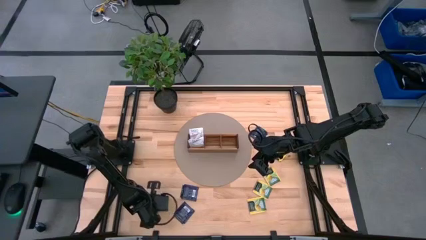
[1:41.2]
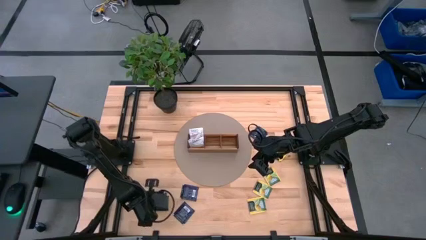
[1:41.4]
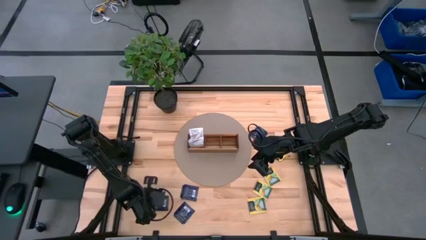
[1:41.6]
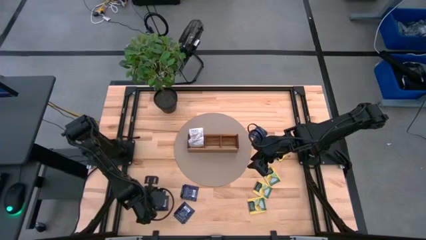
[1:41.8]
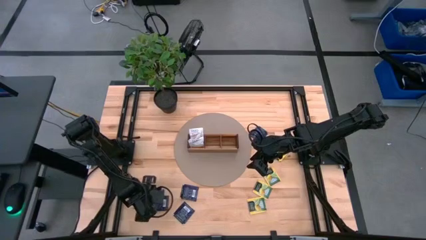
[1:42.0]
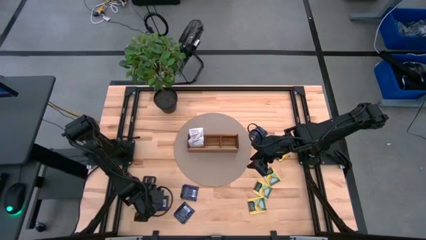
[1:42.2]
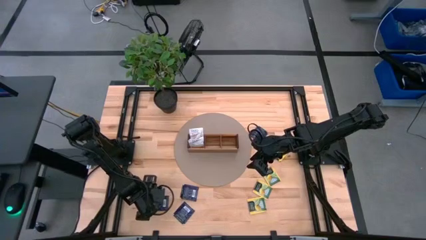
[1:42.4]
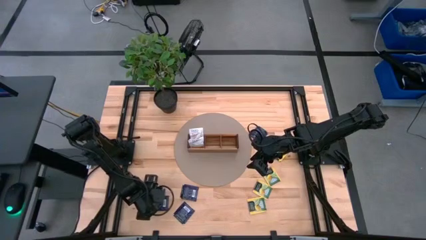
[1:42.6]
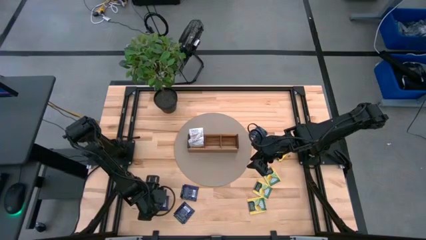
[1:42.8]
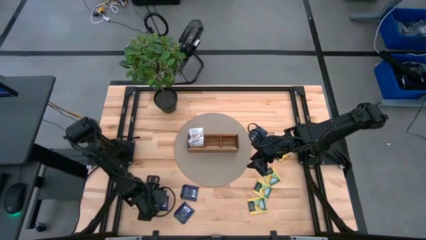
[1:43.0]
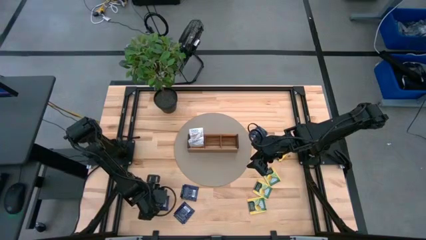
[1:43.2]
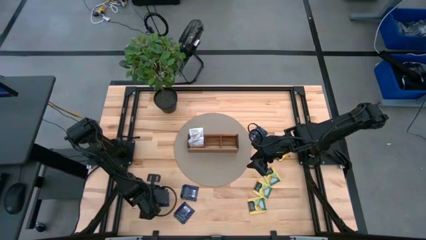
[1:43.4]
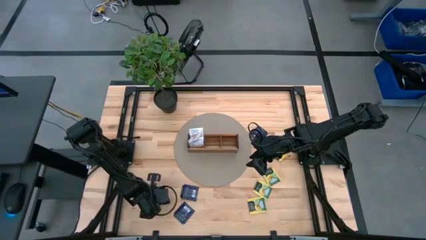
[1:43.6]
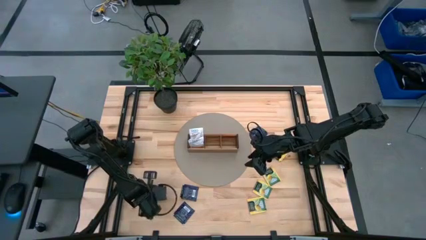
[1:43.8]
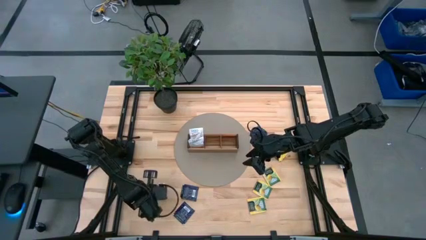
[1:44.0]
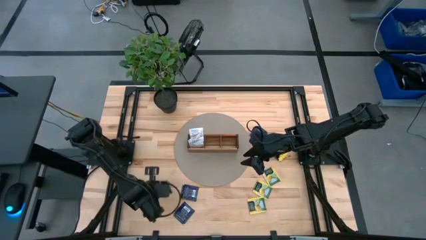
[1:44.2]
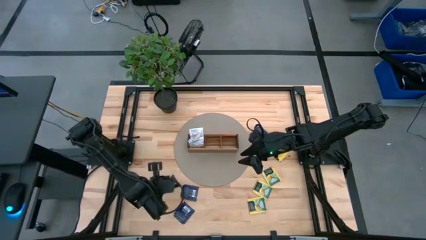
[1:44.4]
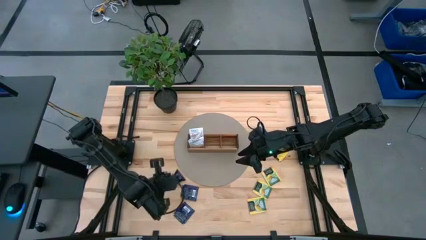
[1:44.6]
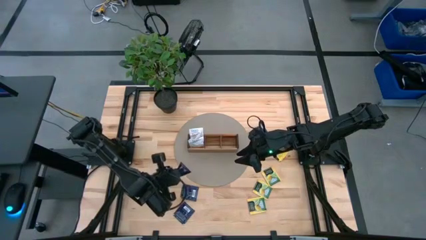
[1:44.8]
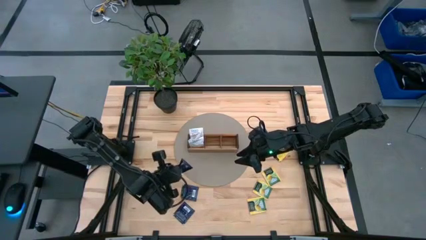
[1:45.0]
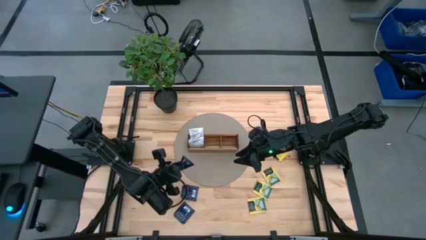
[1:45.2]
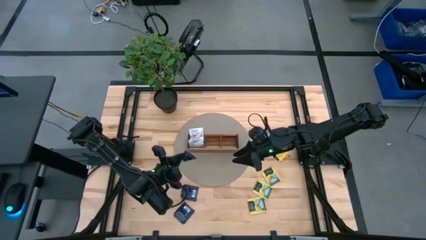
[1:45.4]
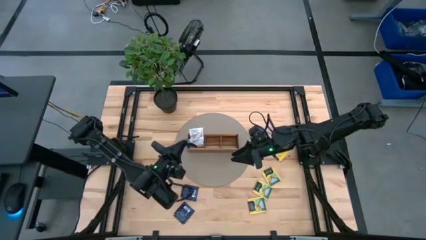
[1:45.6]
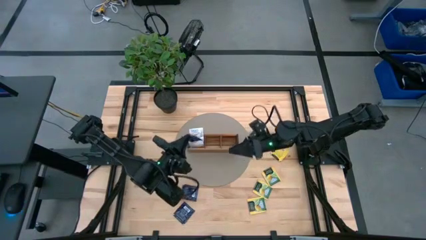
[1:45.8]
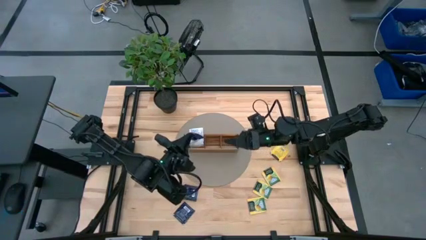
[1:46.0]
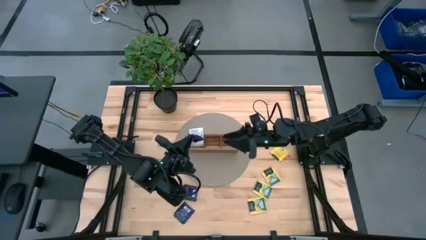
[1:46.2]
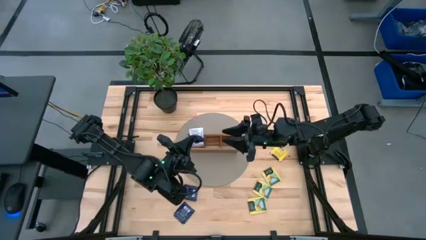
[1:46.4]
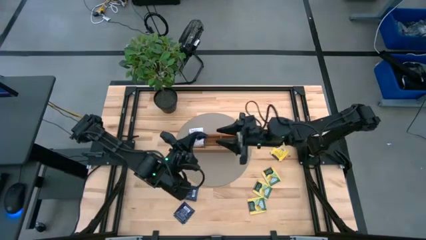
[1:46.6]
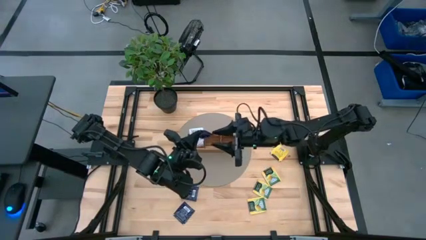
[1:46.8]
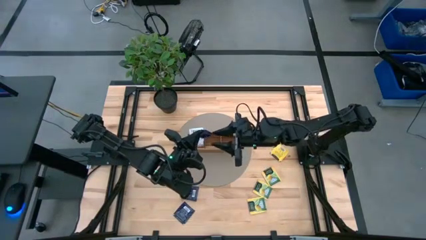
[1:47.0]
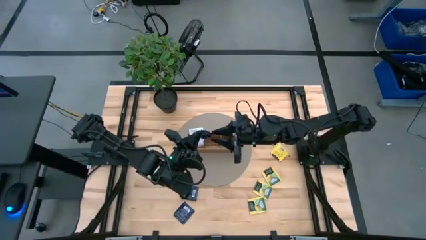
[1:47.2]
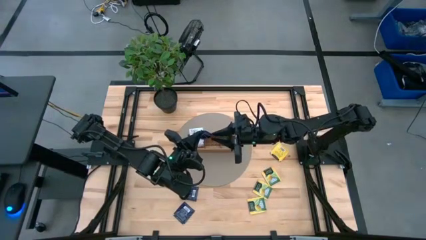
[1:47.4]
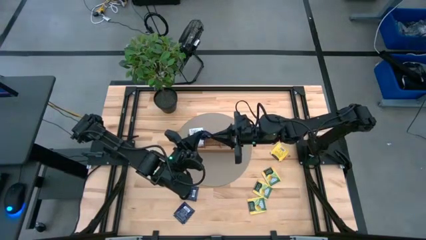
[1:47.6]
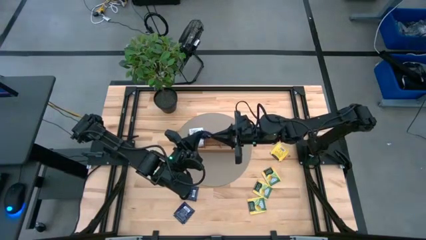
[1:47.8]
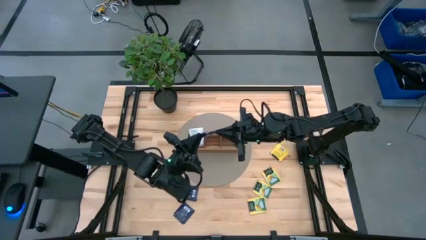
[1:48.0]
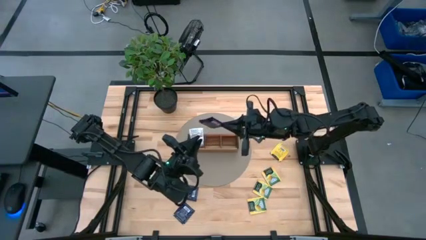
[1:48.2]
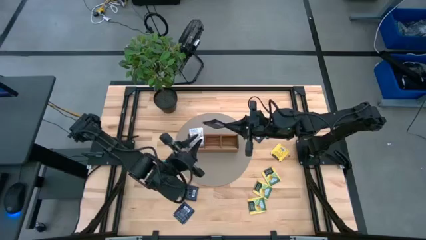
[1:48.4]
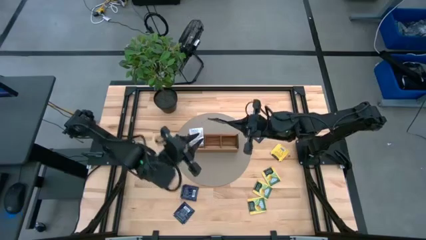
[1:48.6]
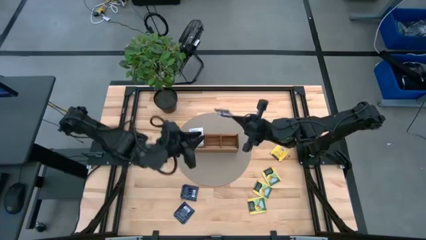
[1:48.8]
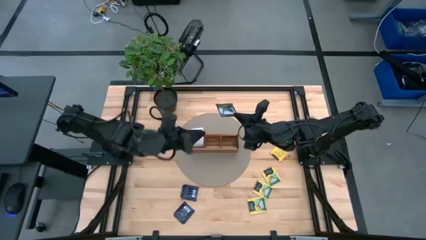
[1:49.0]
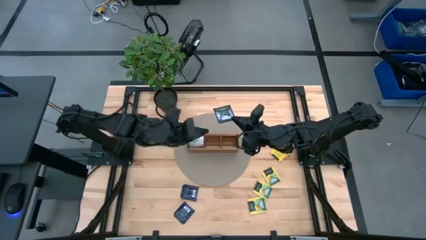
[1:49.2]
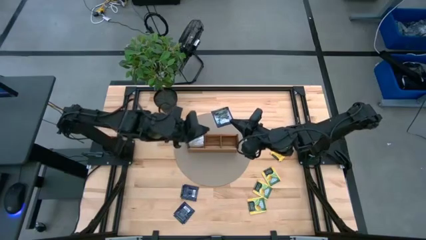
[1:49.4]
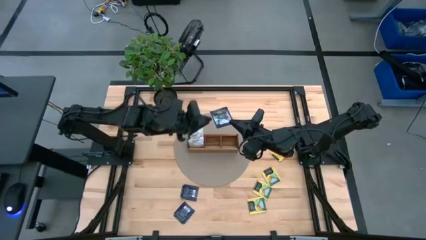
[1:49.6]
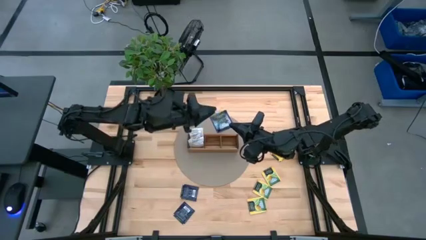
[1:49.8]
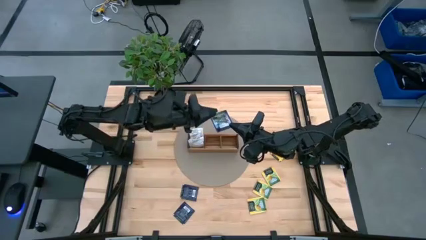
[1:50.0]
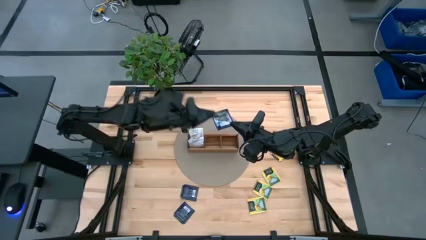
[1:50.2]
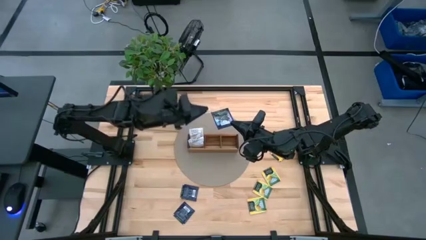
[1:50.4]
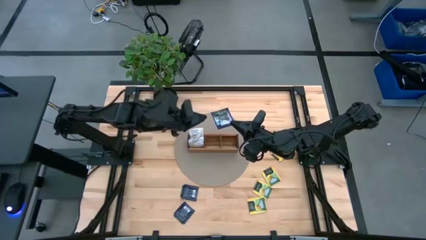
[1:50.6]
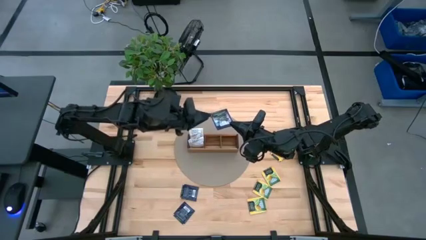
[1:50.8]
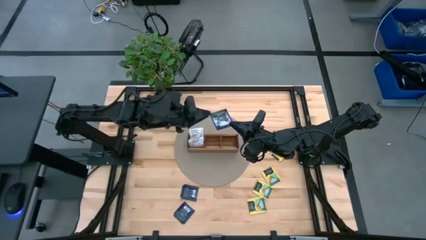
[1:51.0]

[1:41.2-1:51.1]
Task: Pick & Place Tea
Put the blue tea bag into the middle section of the wooden organizer

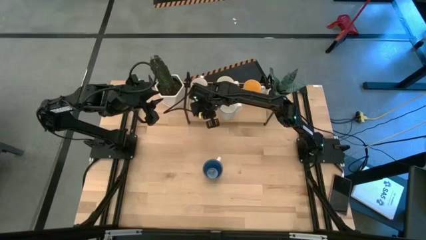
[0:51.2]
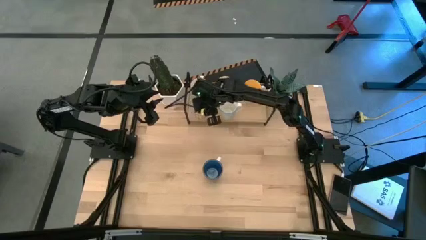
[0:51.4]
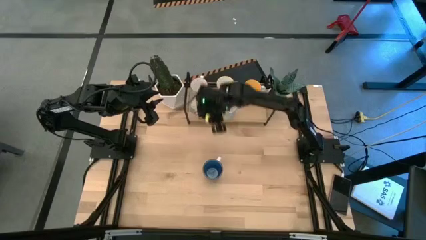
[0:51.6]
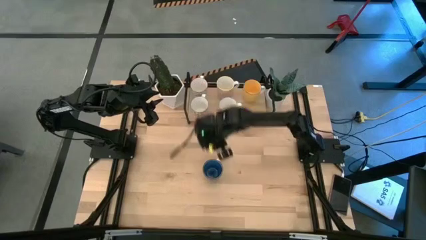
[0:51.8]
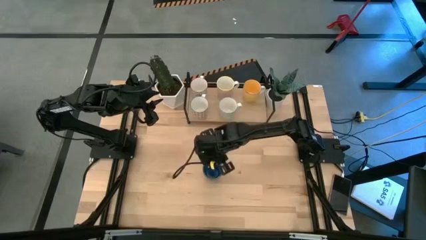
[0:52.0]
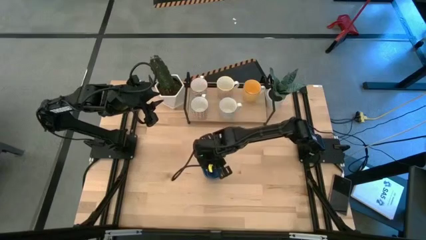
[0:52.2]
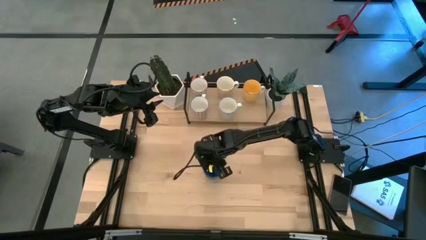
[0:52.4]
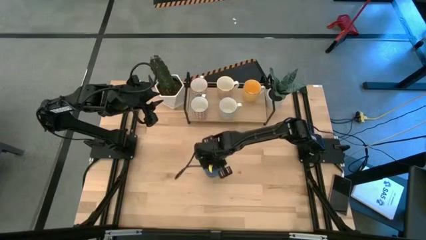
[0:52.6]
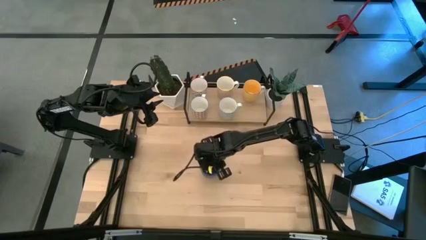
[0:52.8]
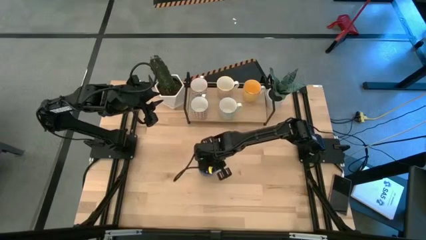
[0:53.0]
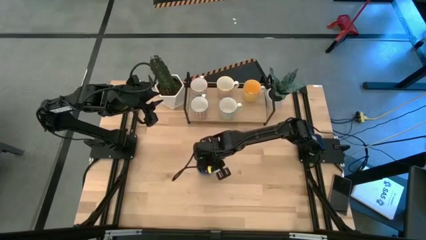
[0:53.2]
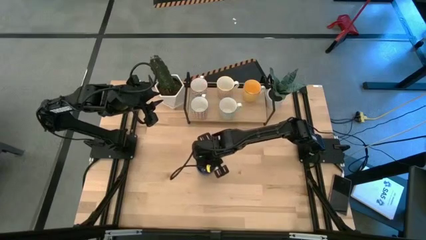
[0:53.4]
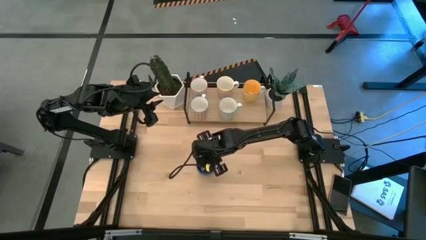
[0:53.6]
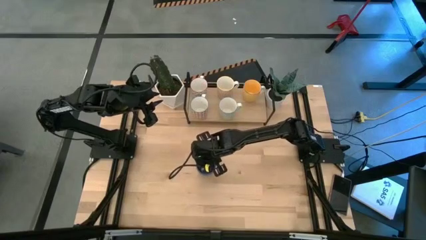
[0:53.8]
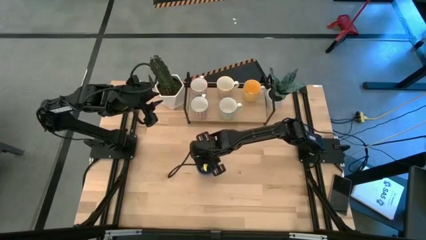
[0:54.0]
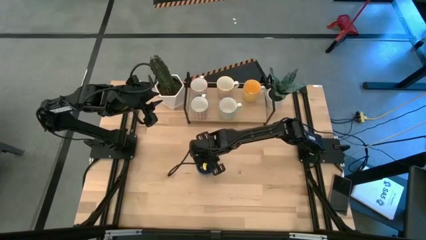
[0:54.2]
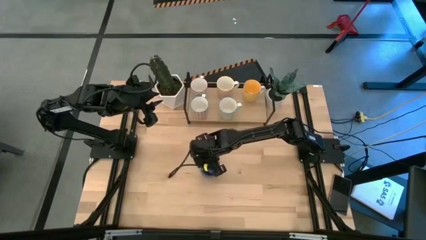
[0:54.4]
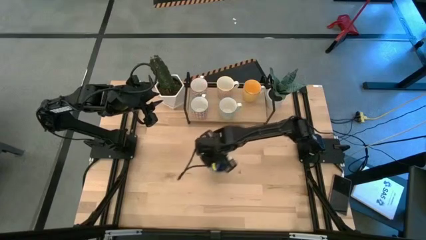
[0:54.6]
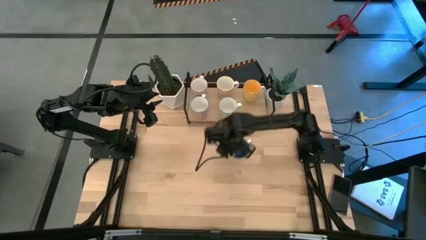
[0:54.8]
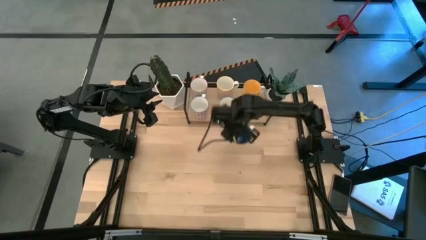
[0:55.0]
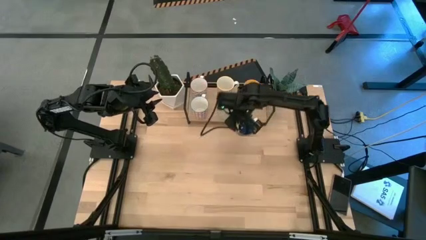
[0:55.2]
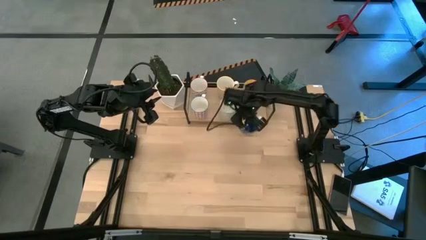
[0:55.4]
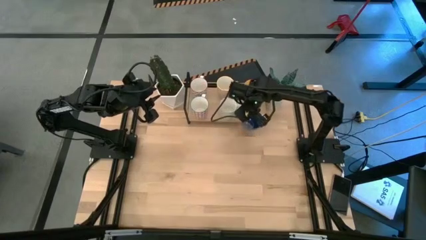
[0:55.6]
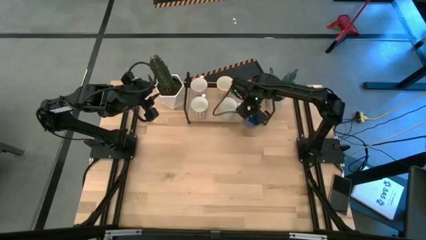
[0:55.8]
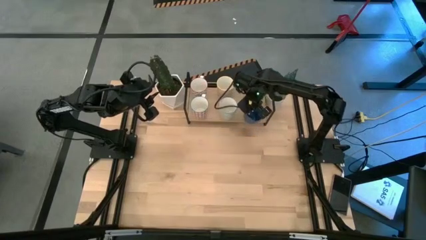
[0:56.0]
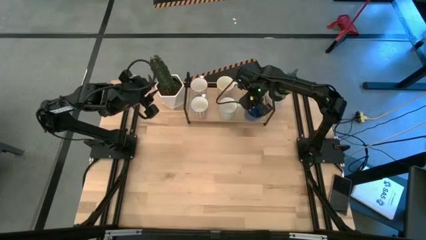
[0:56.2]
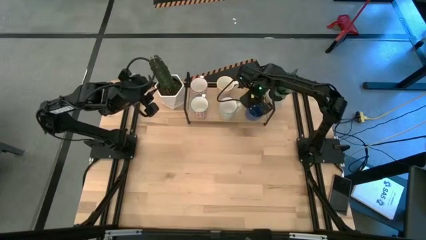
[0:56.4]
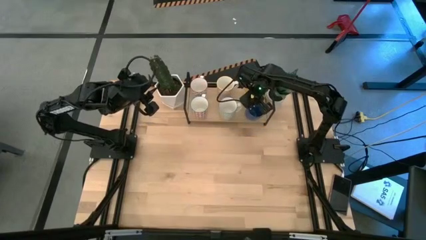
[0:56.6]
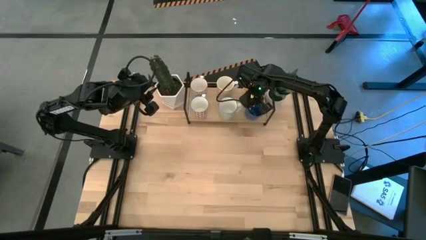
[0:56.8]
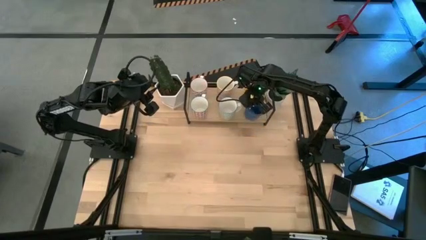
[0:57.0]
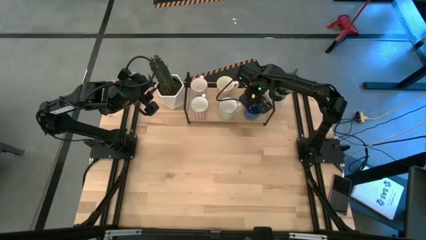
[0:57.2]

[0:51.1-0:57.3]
Task: Place coffee mugs
Put the blue mug on the shelf
